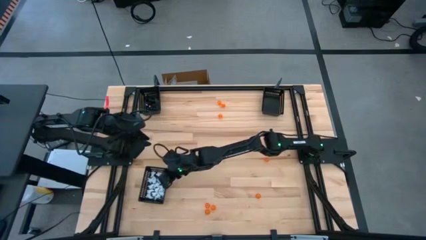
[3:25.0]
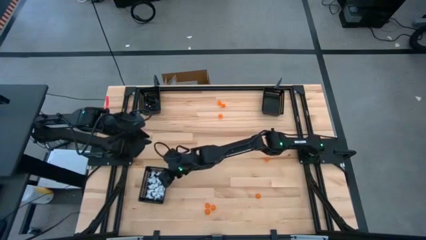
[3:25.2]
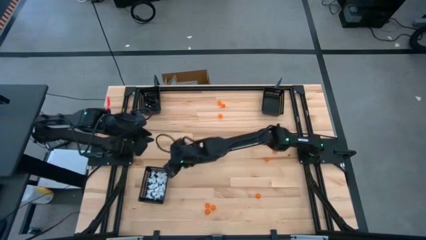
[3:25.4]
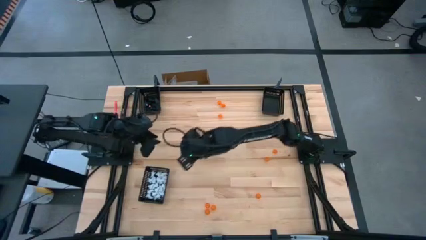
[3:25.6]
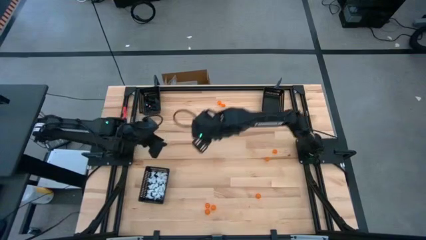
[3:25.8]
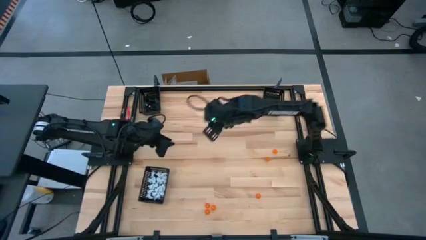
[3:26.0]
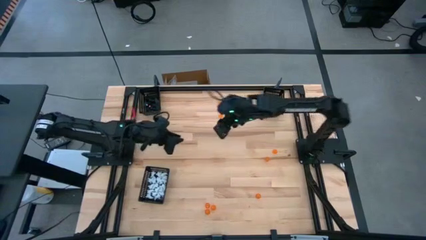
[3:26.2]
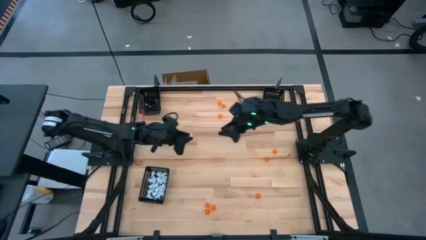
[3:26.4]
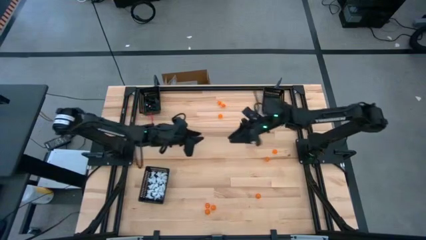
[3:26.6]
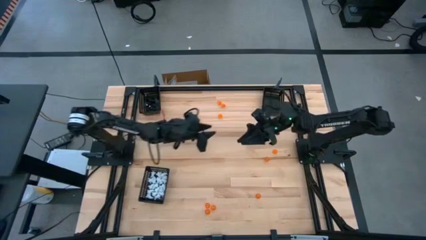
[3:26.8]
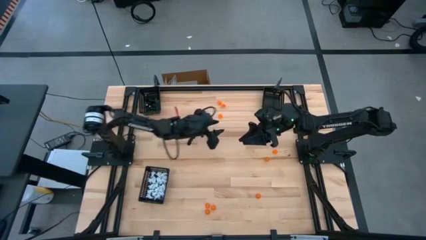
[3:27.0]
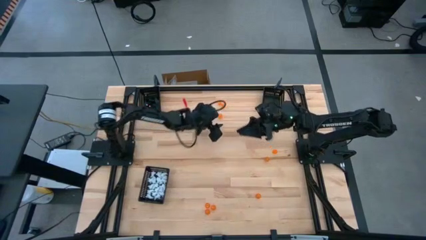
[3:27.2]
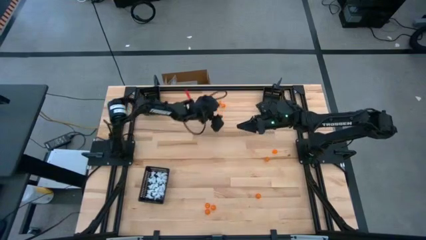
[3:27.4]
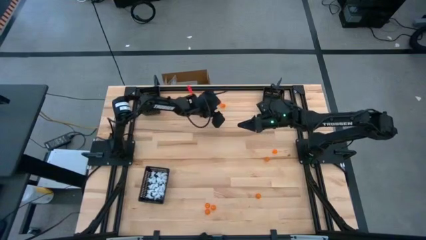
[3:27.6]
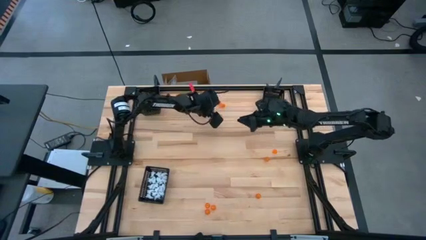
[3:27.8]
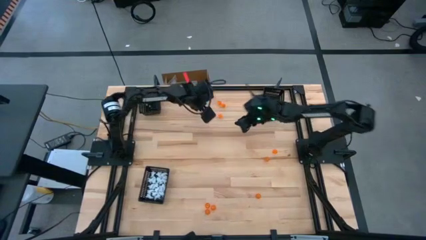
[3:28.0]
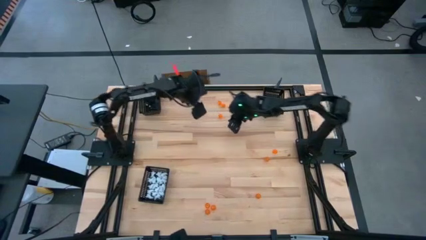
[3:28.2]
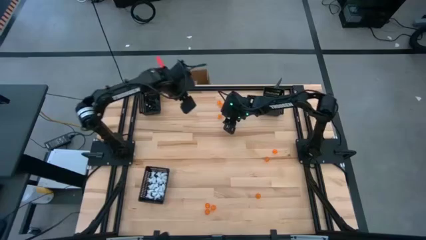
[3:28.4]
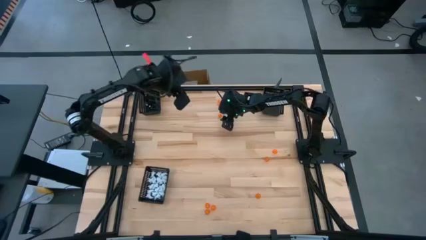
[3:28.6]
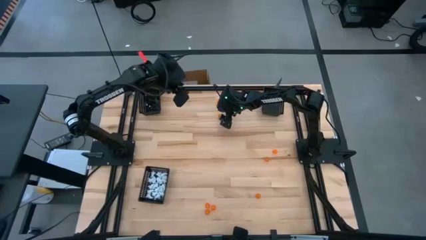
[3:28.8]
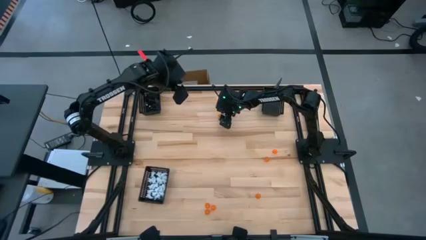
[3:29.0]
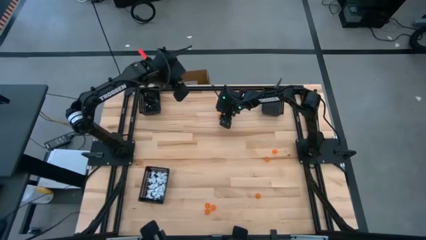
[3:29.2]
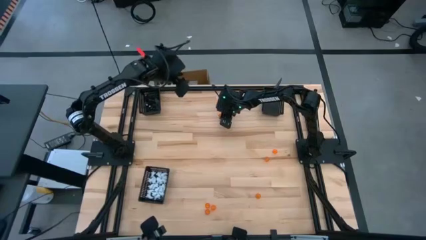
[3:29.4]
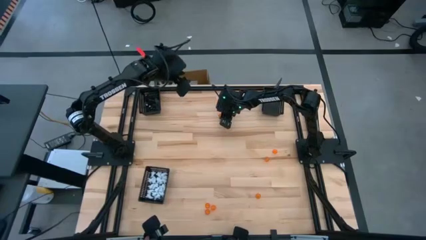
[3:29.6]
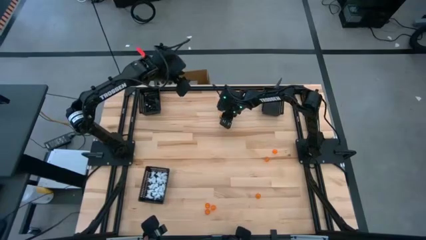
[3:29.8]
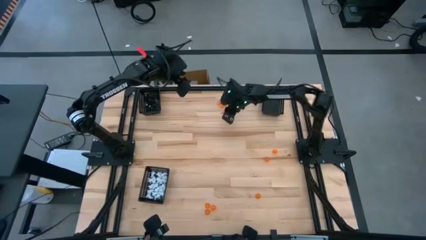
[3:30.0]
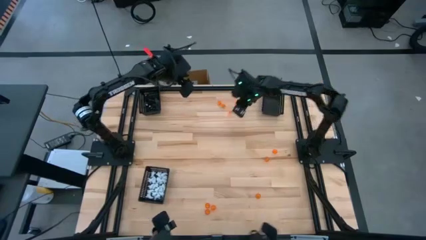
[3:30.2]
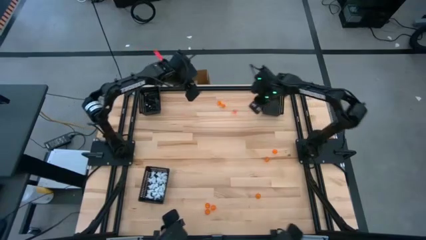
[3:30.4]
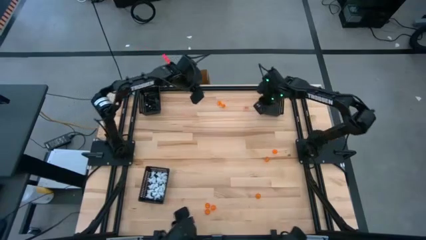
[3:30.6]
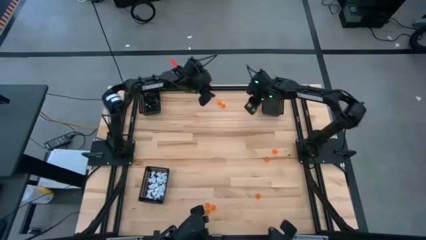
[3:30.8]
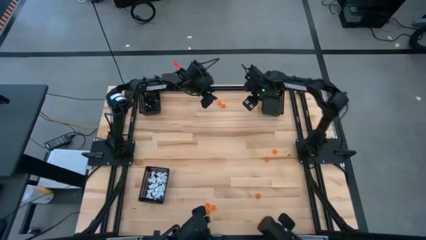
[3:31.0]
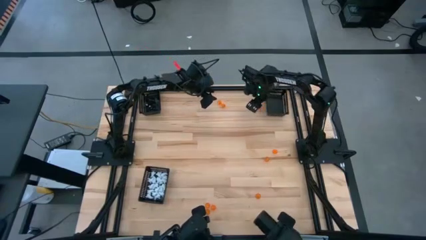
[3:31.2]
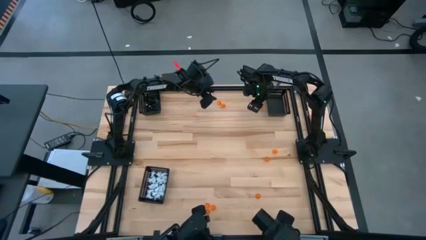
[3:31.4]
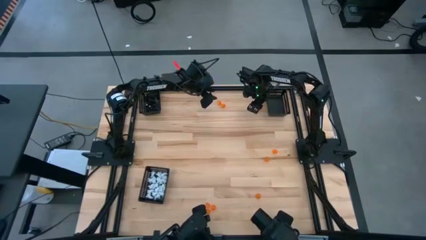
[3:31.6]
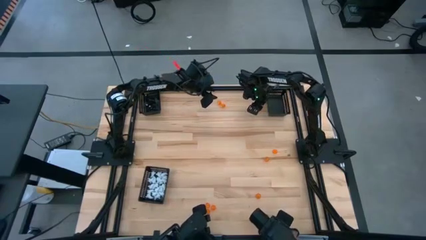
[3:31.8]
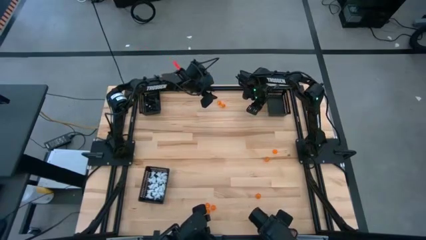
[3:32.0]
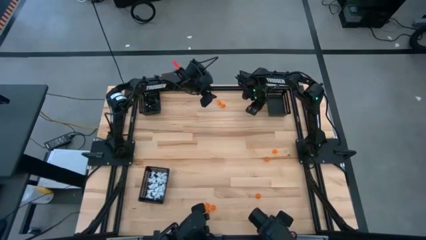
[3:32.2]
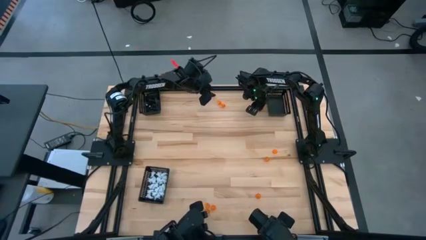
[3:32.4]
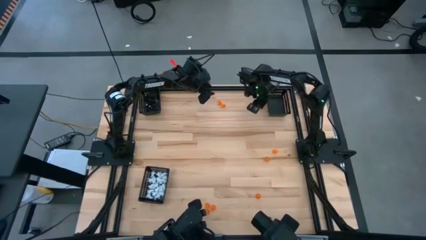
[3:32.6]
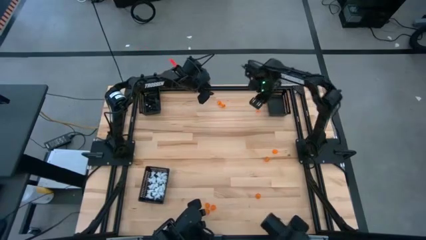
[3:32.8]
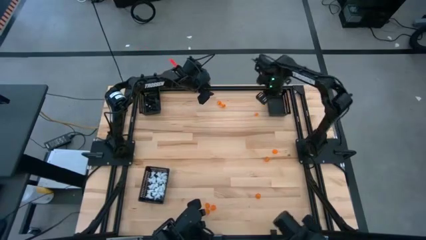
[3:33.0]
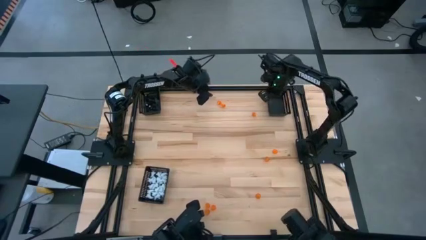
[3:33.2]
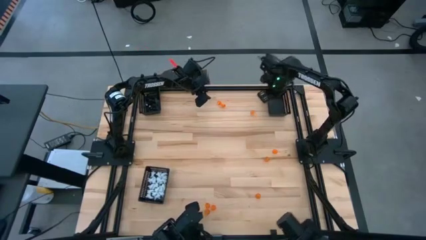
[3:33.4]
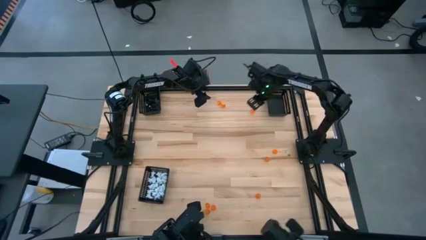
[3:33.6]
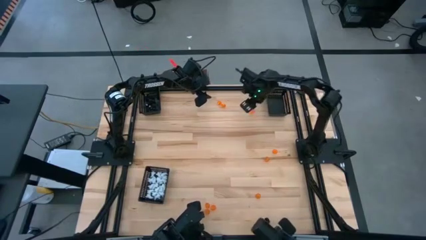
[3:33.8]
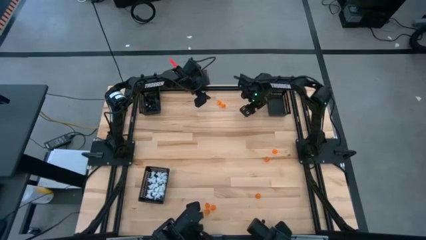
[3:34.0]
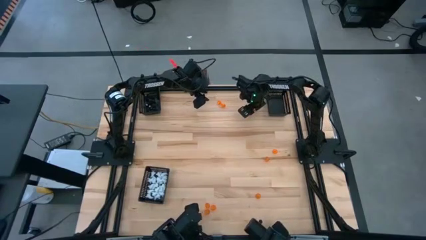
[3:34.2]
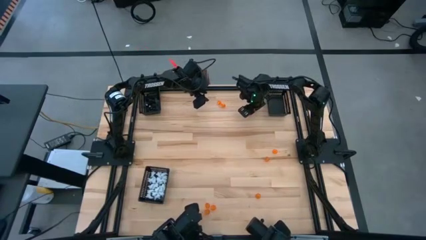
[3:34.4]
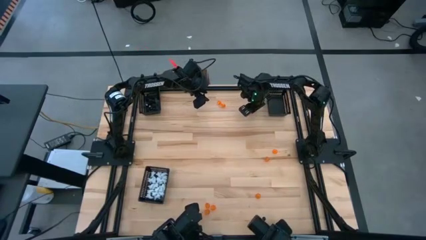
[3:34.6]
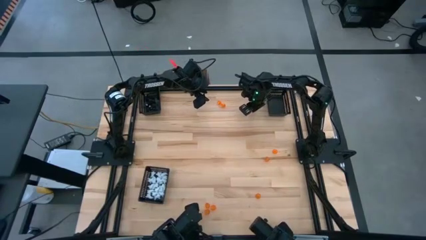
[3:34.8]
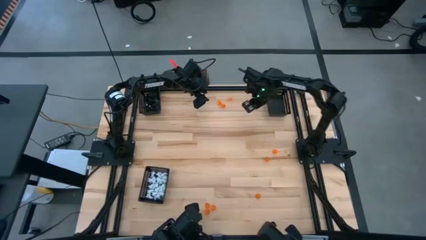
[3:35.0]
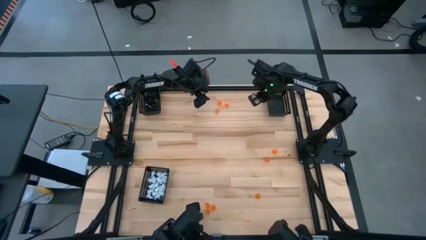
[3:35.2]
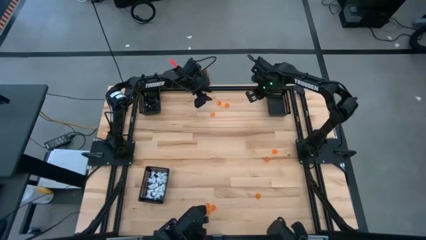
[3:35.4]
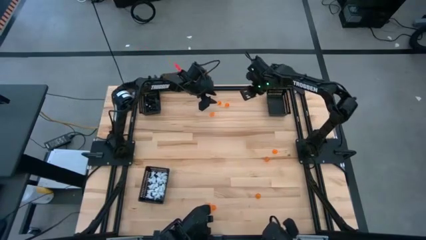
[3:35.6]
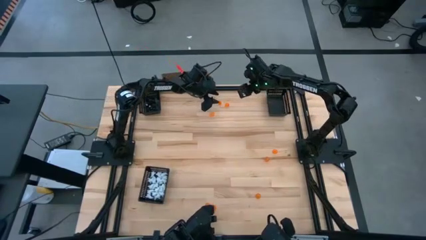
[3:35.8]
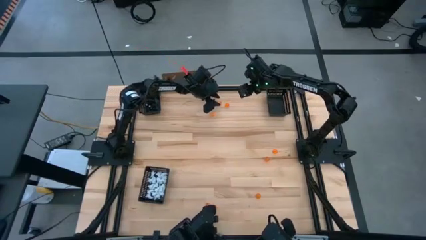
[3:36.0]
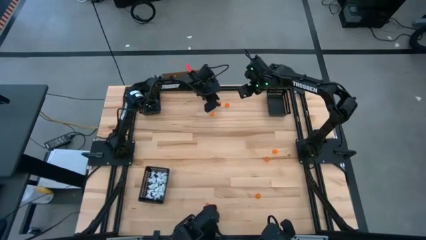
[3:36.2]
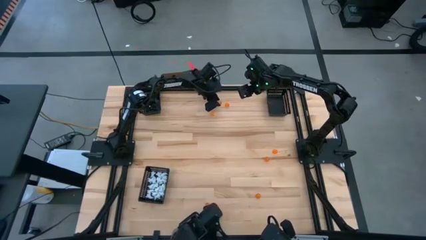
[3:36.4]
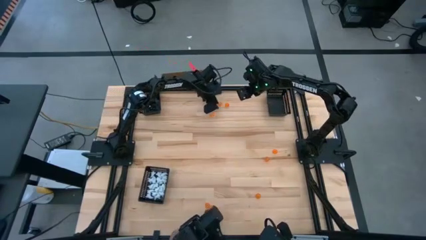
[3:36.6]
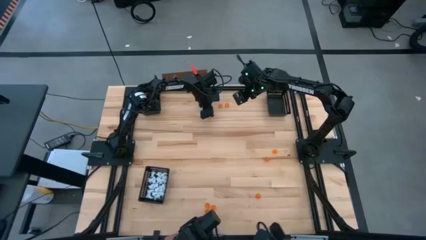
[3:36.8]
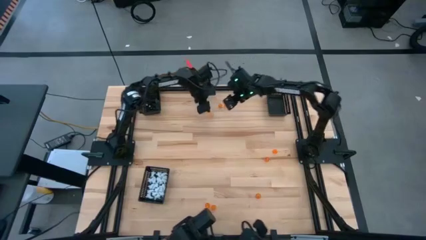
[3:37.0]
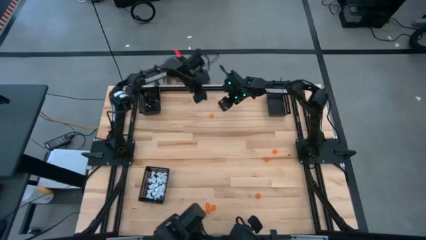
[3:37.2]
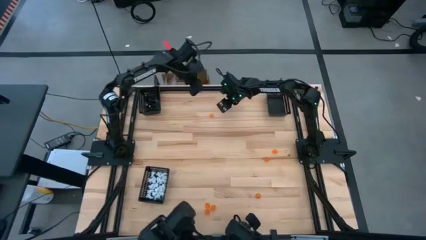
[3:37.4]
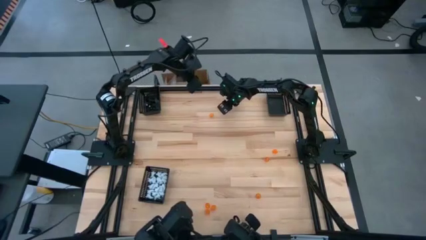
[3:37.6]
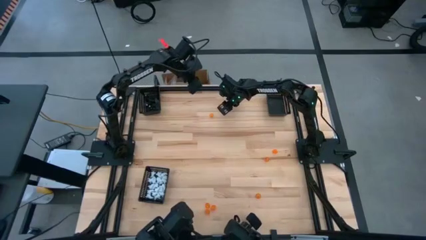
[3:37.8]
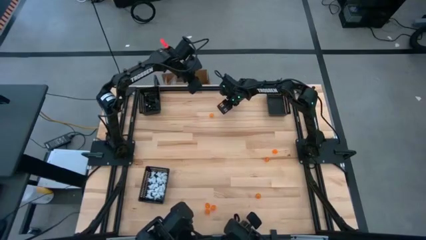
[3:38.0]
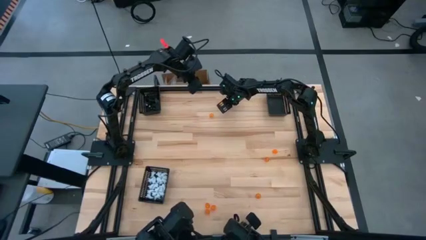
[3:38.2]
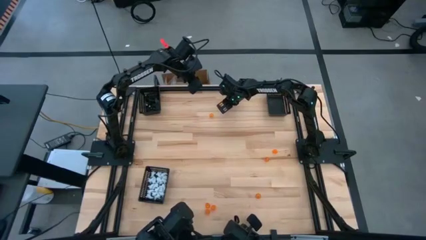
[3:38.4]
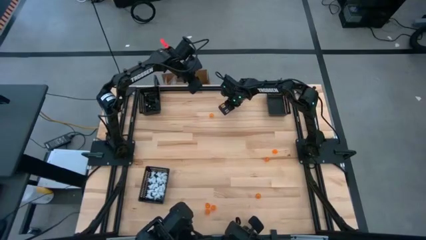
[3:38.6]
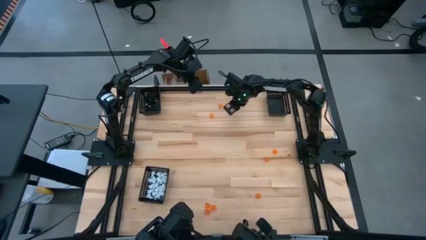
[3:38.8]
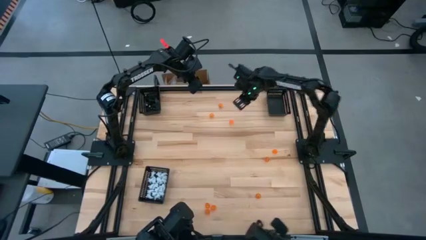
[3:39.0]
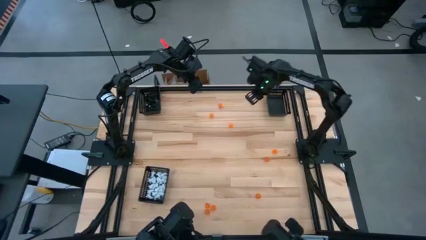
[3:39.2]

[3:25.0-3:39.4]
Task: Sort Halloween decoration
Put the orange pumpkin toy into the top right black basket

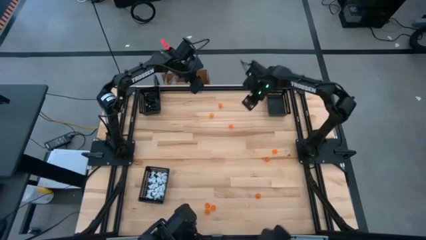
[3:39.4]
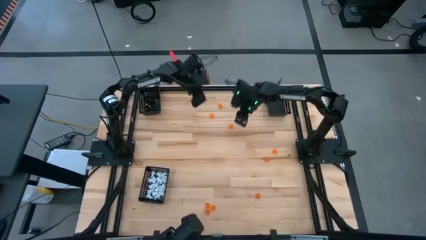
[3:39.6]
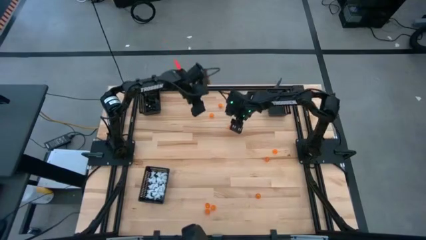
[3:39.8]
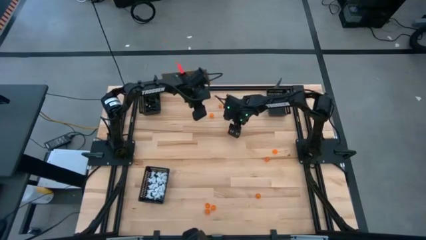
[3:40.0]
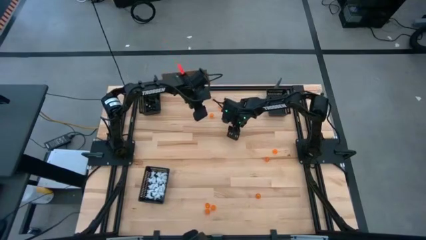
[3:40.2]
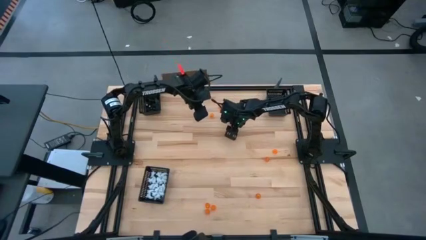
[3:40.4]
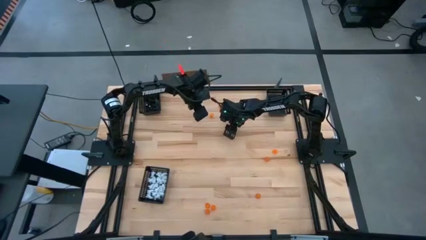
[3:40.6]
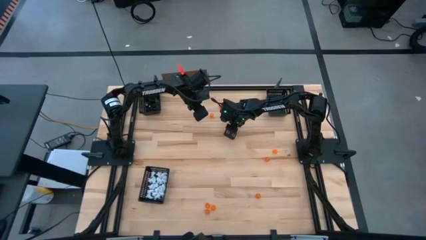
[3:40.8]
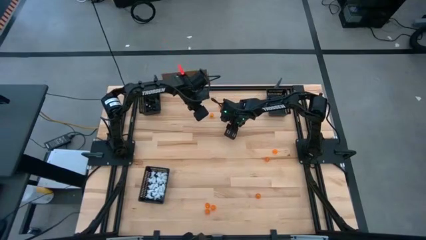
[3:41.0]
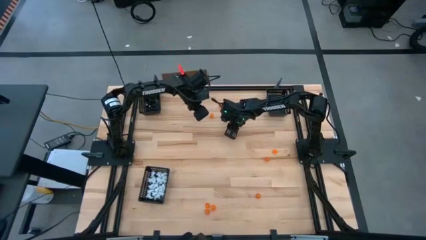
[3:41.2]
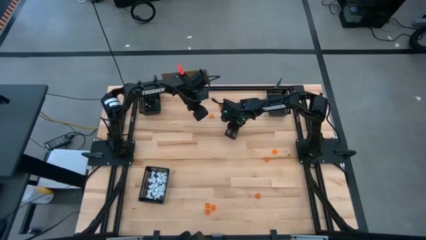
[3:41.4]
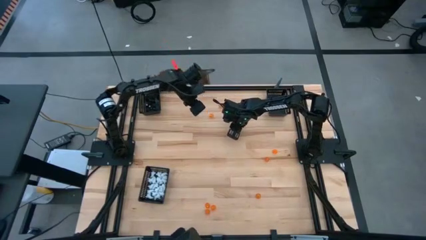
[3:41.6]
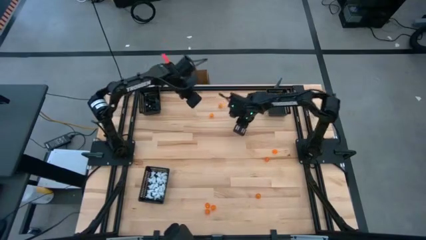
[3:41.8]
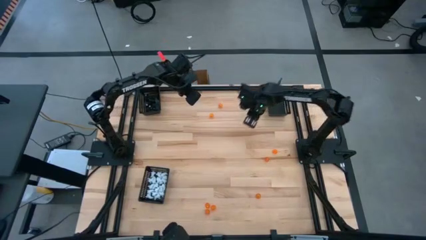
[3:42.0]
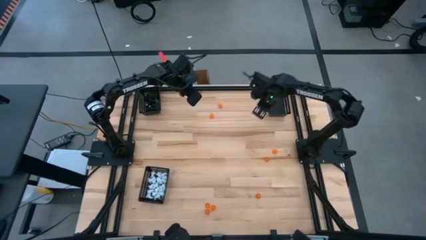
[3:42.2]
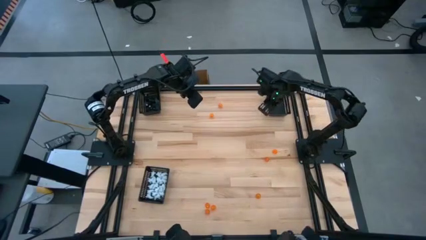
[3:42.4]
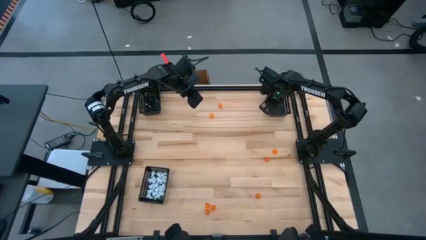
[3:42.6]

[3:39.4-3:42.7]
Put the orange pumpkin toy into the top right black basket
